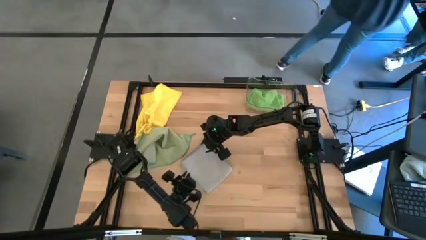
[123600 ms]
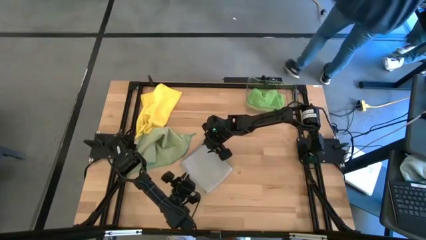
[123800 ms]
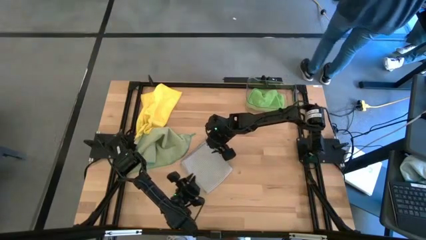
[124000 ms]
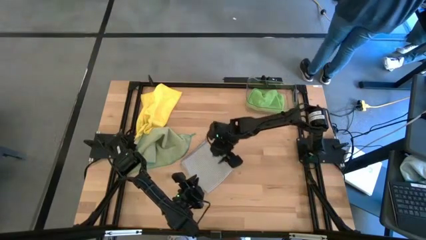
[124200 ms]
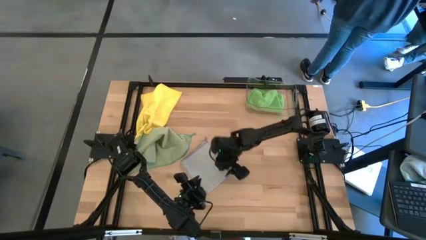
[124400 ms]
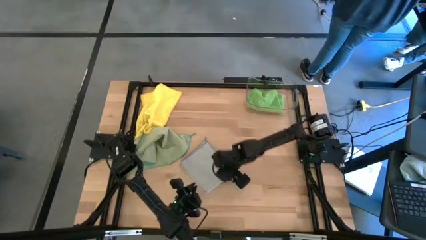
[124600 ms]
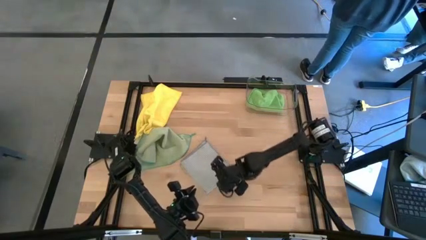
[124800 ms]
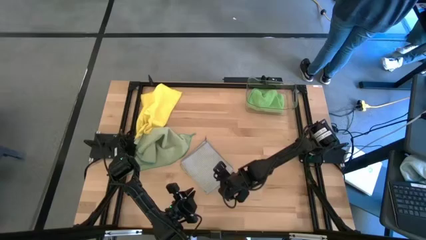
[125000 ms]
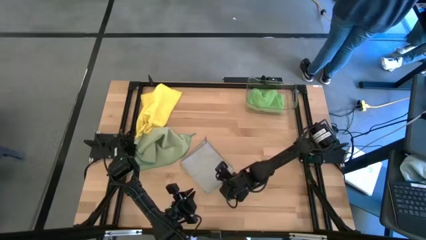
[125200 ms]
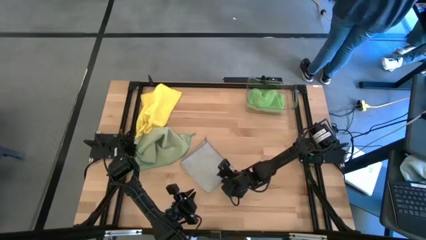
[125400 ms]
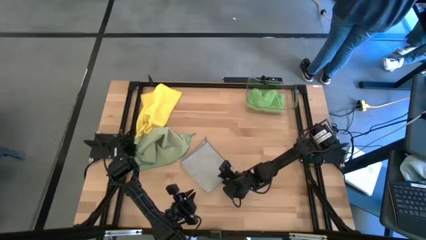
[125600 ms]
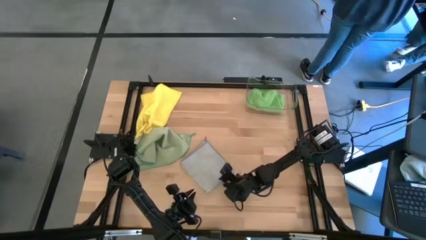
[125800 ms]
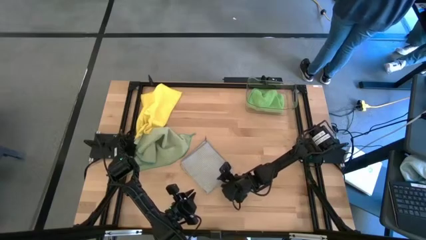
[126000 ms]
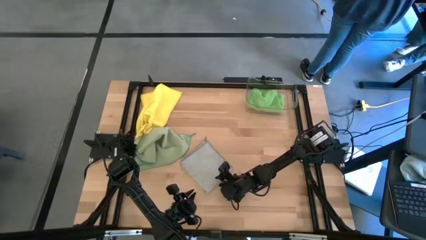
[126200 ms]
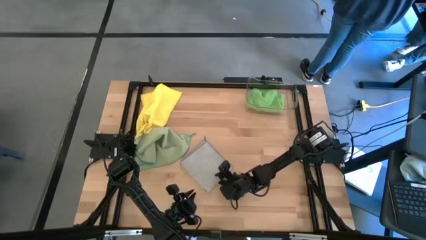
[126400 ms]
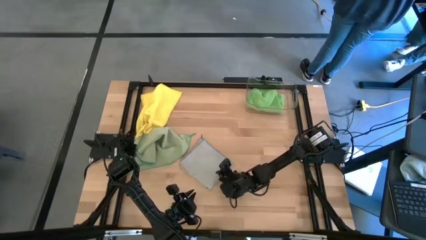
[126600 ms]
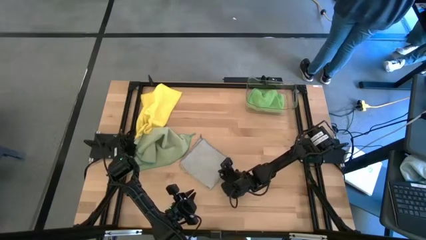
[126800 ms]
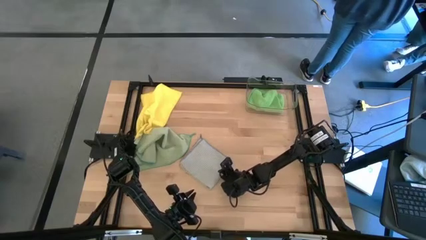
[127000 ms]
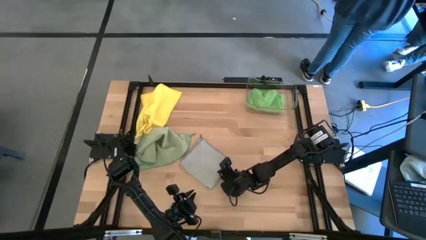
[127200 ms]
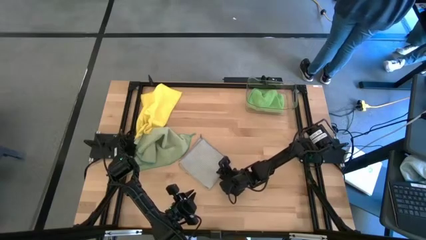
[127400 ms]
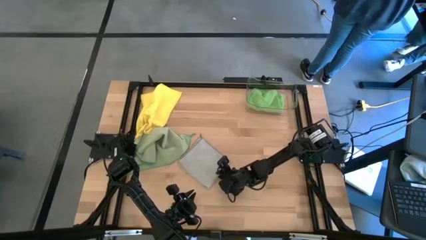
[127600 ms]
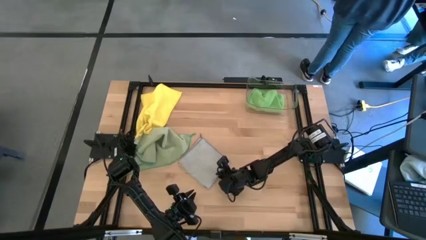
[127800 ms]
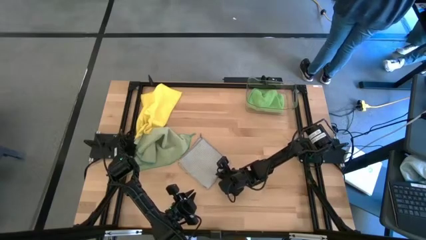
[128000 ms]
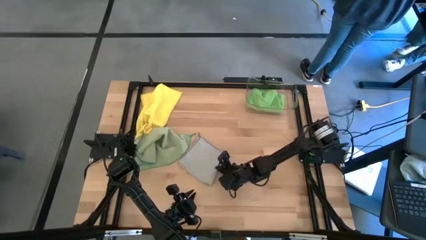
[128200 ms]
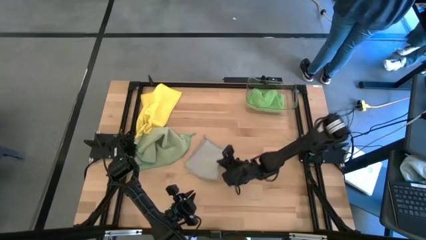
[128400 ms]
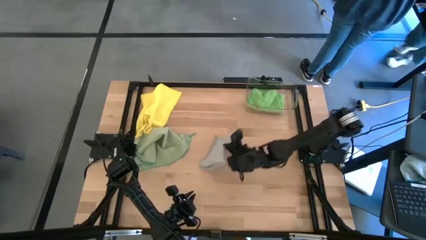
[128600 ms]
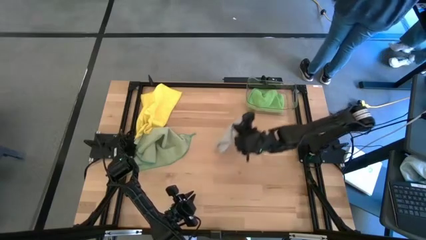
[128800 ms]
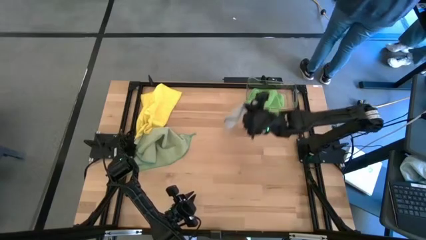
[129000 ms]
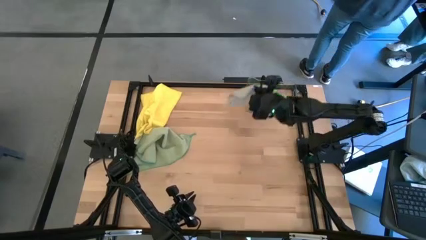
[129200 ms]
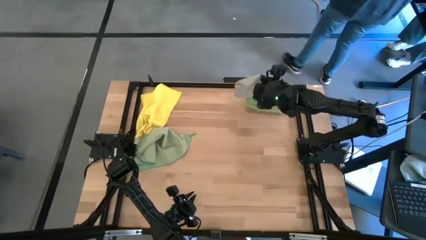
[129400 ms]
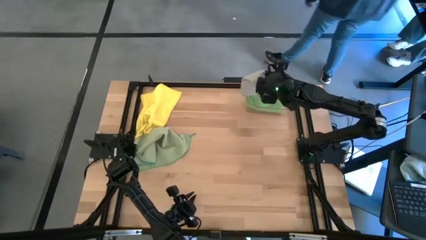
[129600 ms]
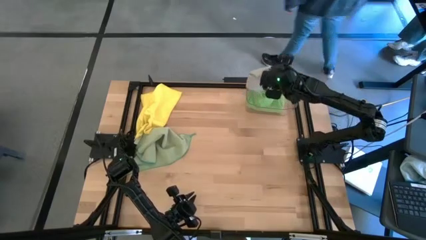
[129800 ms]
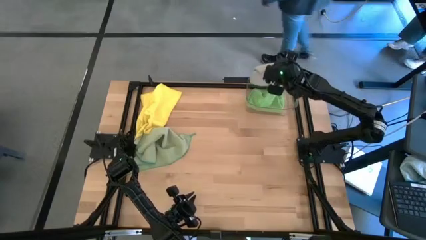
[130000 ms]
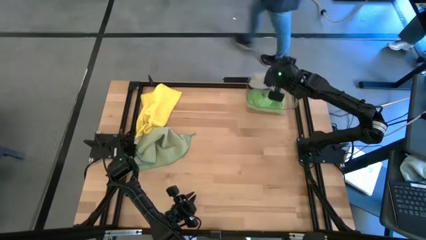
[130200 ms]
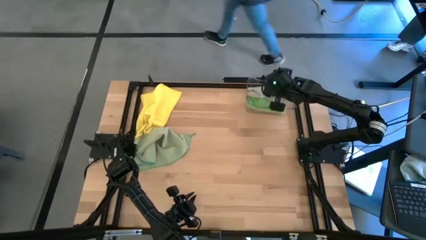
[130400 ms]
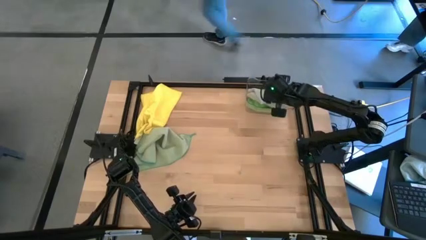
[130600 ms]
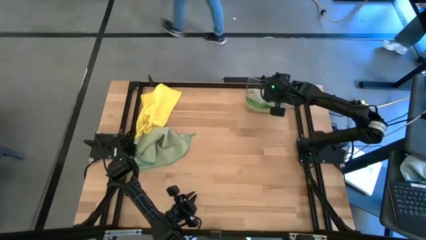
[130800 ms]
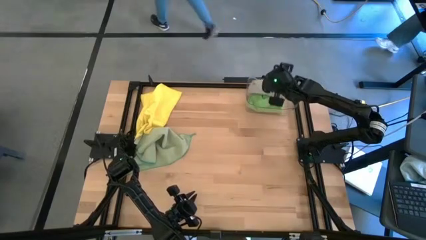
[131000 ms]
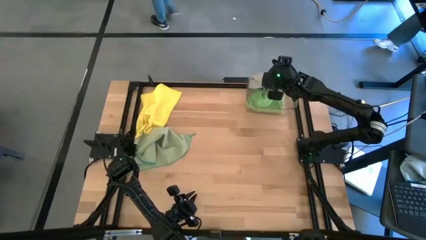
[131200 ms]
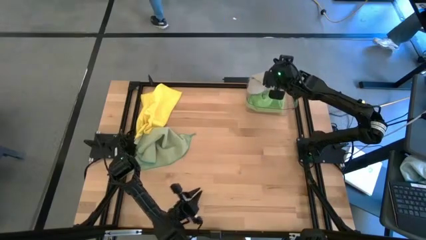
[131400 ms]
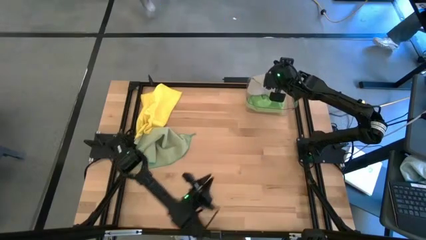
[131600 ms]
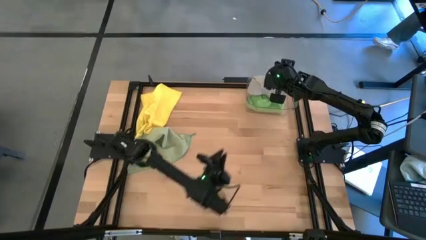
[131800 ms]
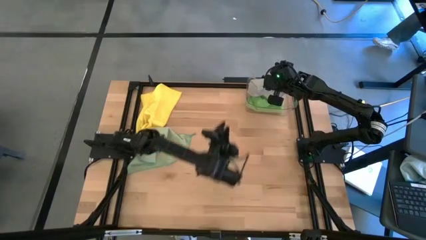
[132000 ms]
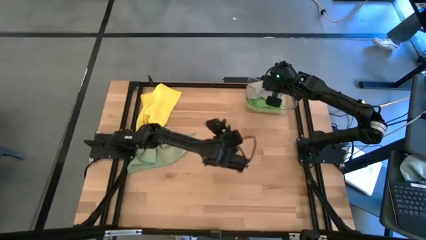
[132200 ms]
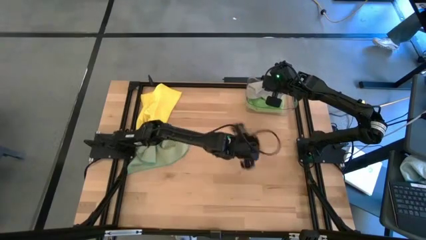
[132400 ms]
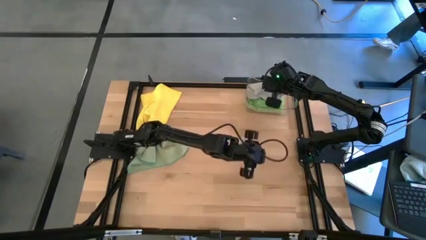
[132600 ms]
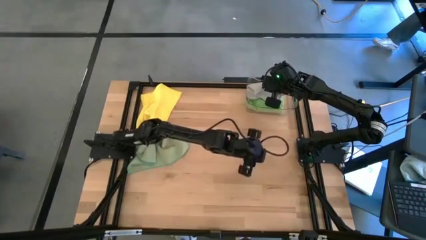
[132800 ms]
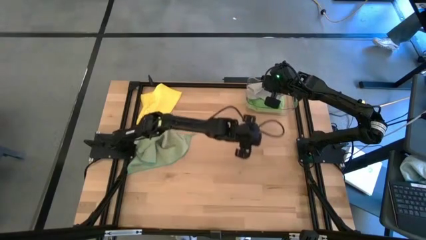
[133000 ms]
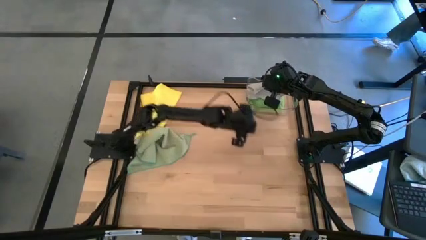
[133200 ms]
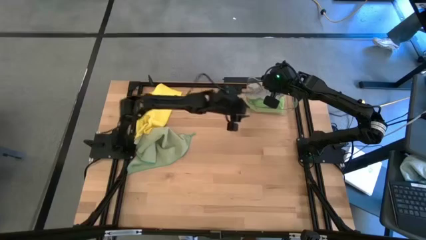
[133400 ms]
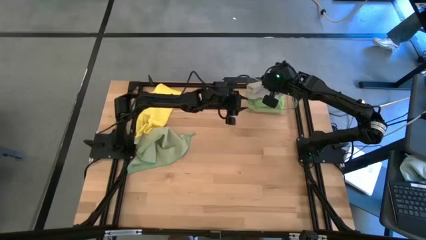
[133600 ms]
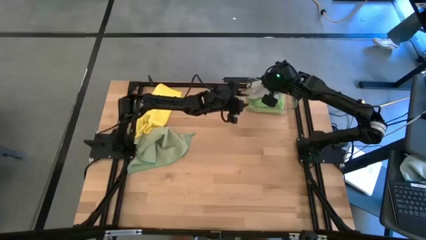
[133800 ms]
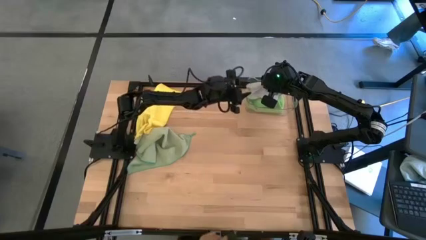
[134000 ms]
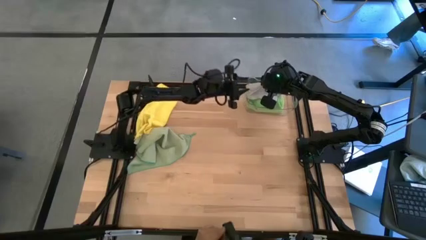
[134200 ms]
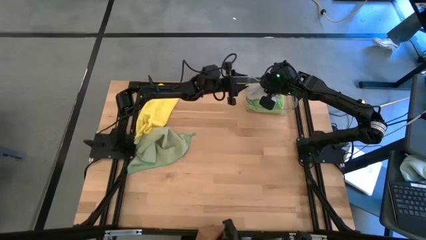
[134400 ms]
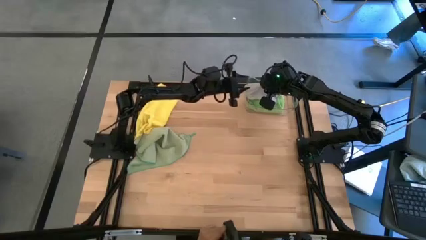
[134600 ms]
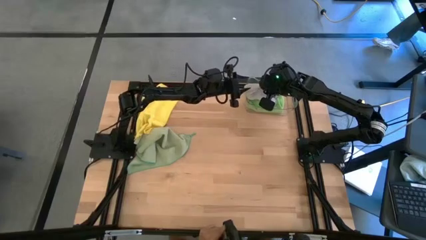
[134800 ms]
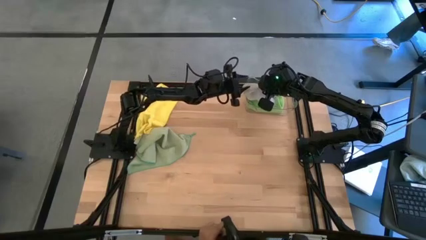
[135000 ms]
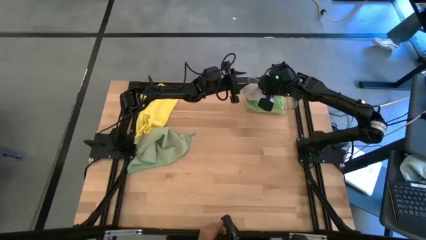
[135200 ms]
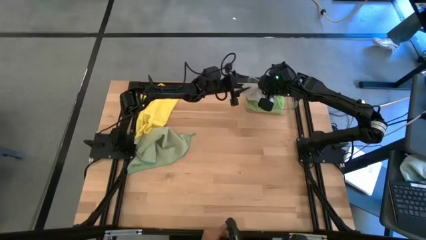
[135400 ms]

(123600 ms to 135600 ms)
Task: Fold microfiber towels
Put the gray cloth into the transparent bin

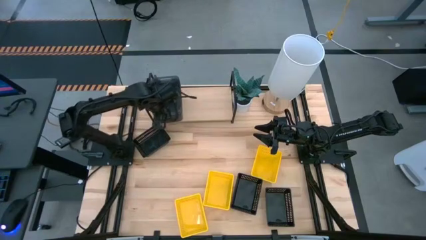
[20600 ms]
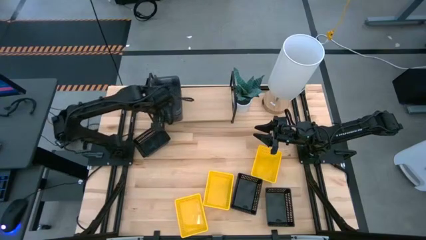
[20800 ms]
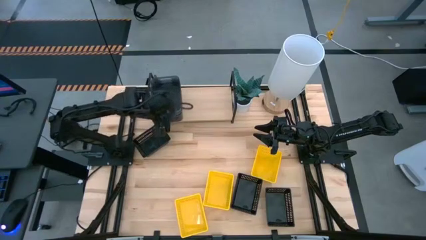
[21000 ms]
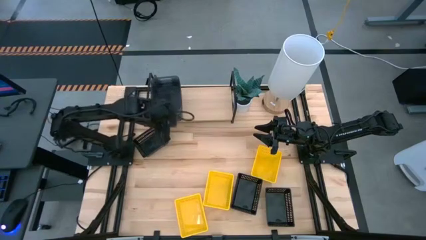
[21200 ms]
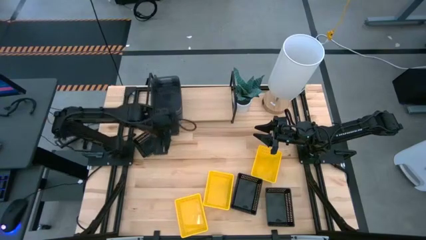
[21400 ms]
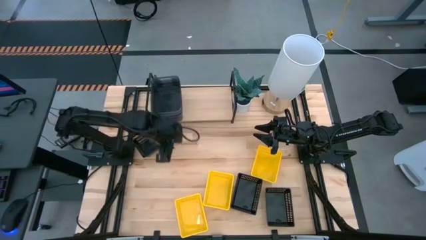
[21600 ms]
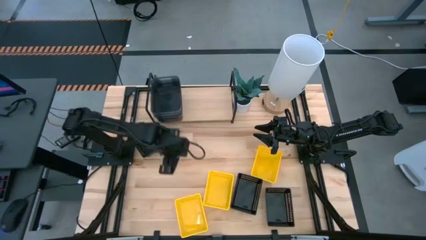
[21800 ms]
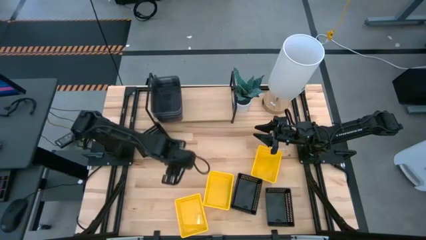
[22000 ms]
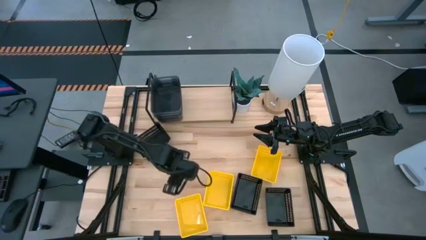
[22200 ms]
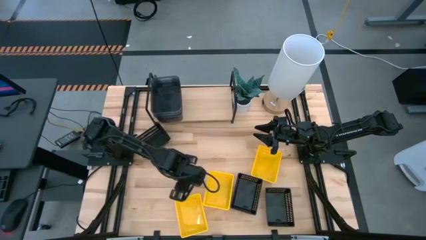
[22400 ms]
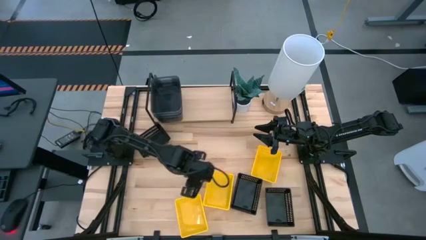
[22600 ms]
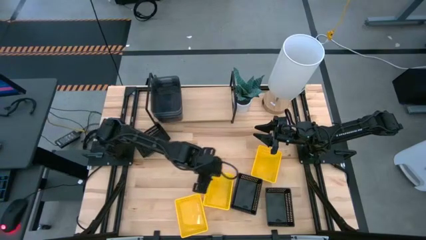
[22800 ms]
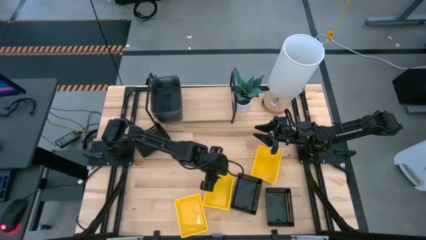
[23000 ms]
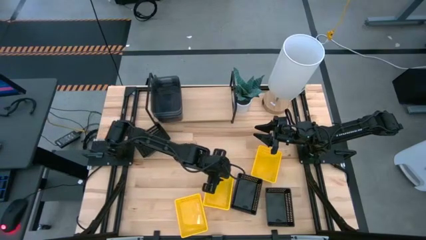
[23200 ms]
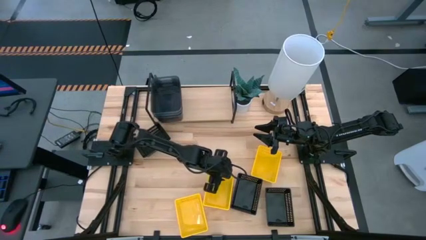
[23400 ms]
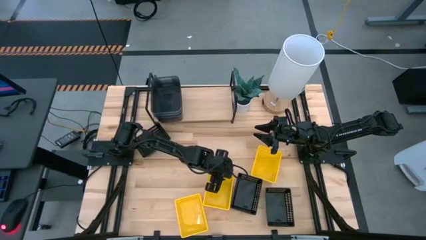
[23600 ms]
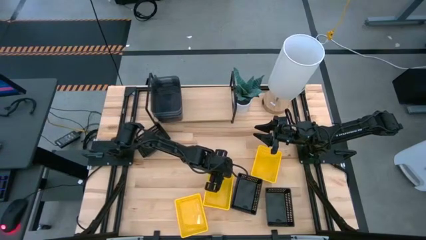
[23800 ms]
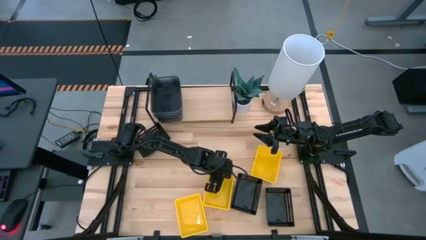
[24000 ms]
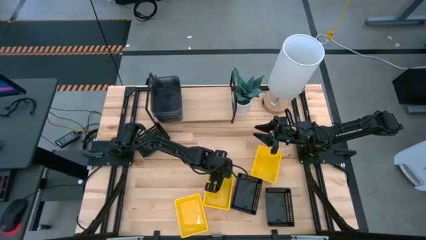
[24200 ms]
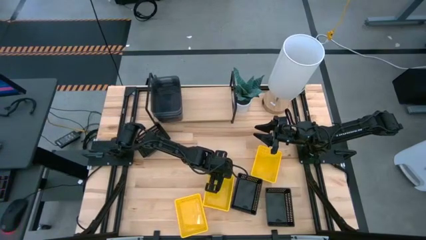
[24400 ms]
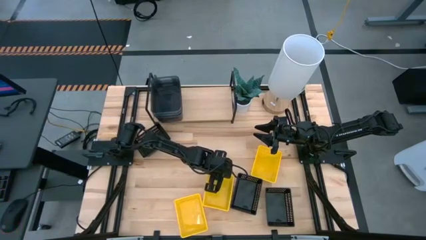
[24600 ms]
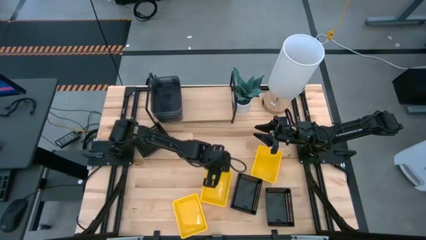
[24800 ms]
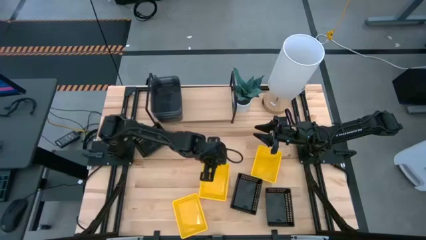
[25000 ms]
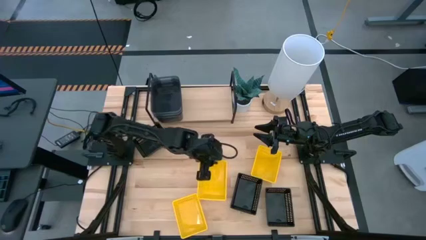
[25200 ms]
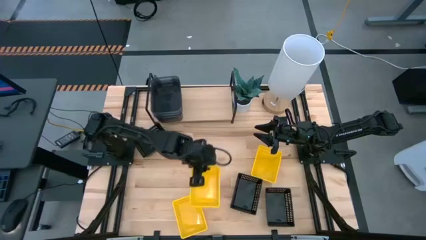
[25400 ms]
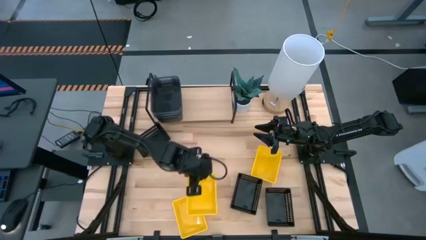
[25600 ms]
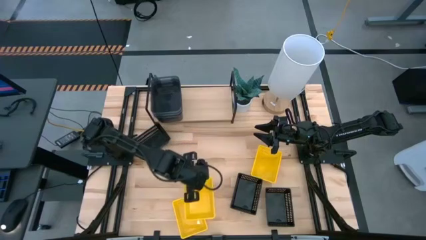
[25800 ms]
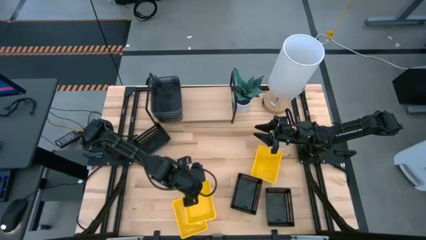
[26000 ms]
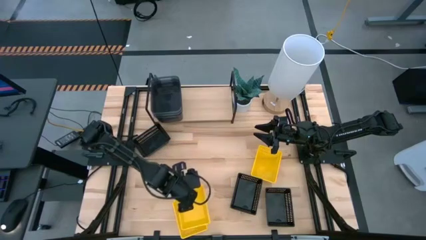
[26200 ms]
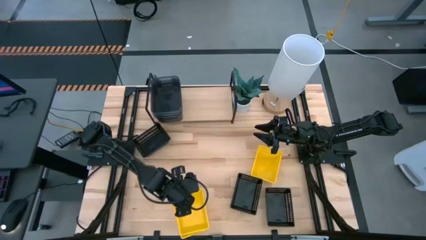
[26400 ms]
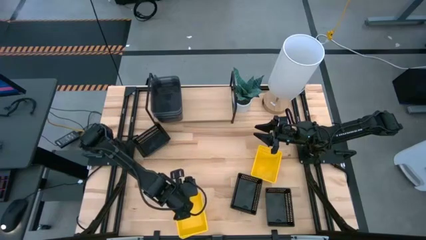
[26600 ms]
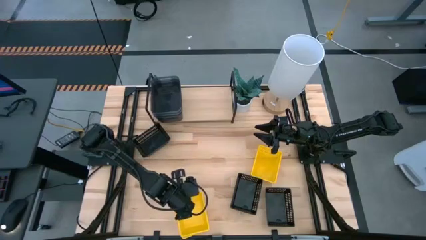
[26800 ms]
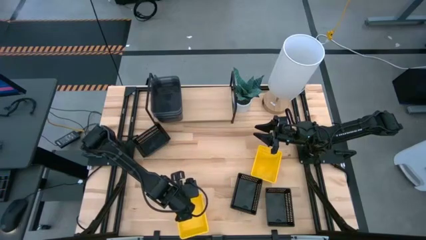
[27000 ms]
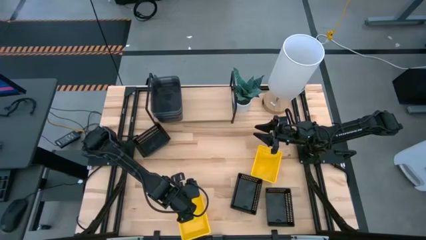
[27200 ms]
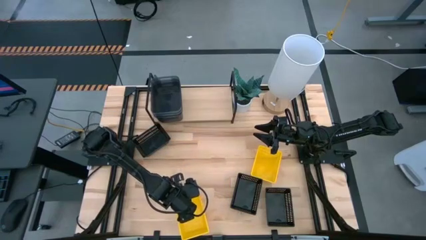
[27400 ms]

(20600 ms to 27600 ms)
Task: Stack baskets on shelf by color
Stack the middle yellow bin on top of the bottom yellow bin
